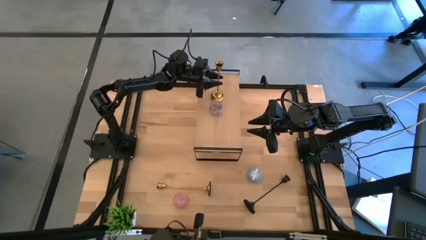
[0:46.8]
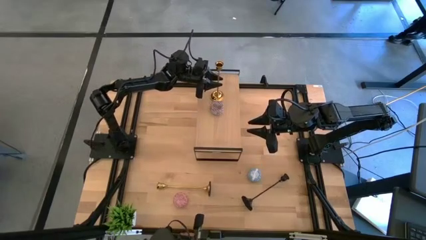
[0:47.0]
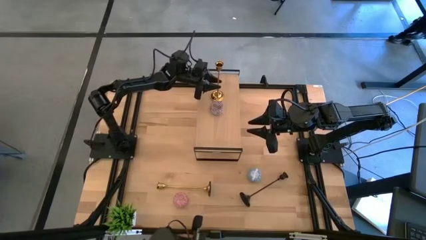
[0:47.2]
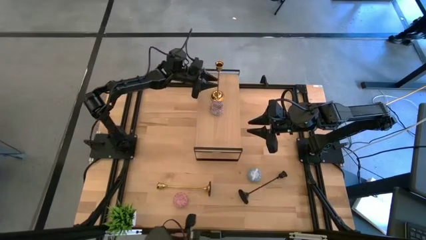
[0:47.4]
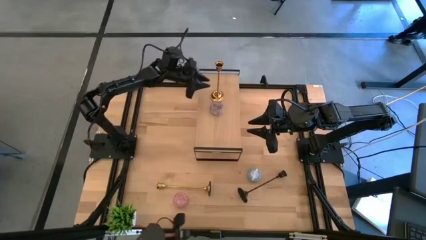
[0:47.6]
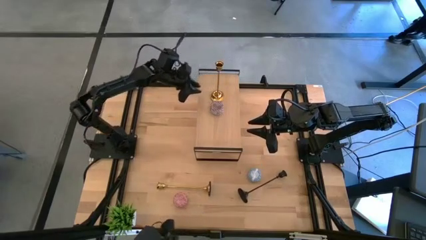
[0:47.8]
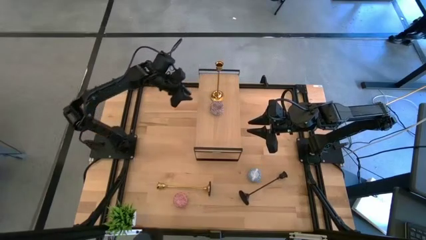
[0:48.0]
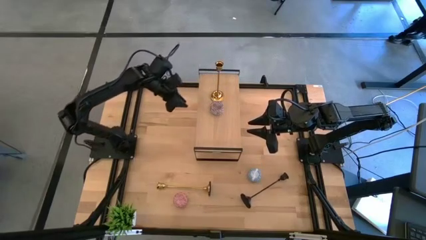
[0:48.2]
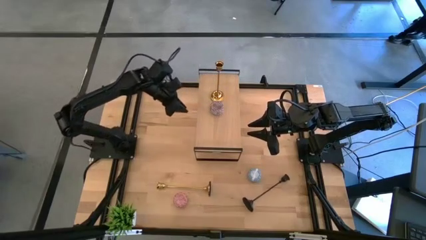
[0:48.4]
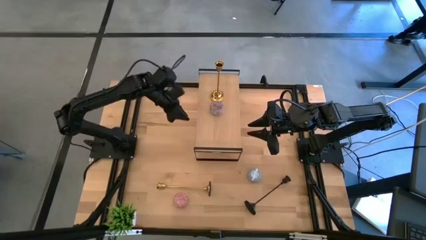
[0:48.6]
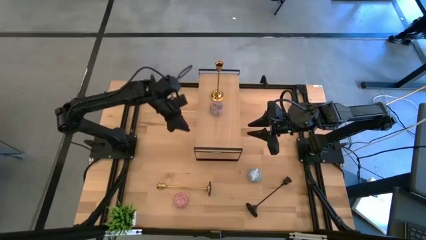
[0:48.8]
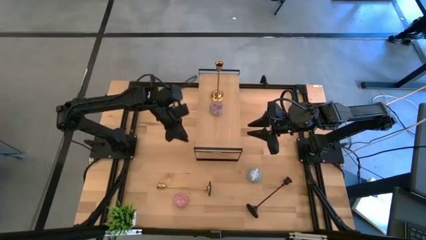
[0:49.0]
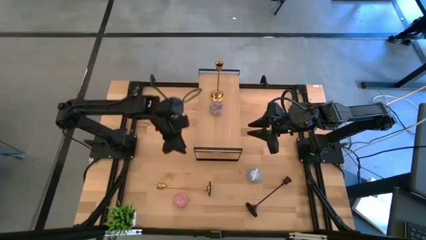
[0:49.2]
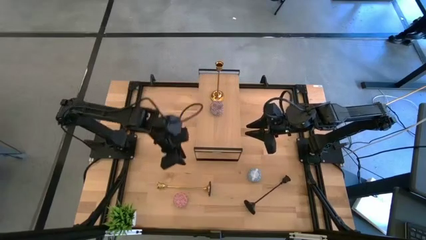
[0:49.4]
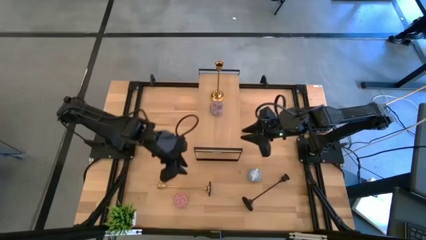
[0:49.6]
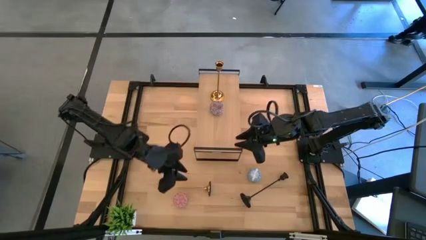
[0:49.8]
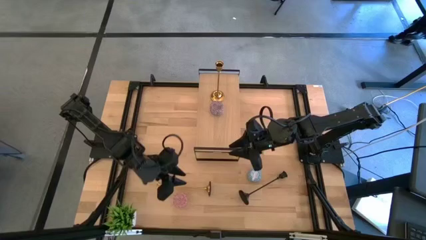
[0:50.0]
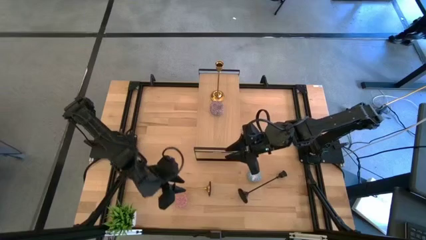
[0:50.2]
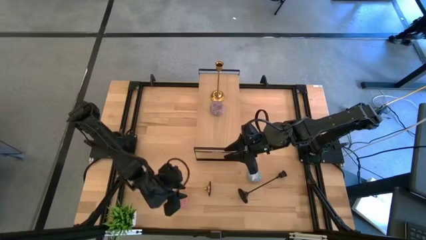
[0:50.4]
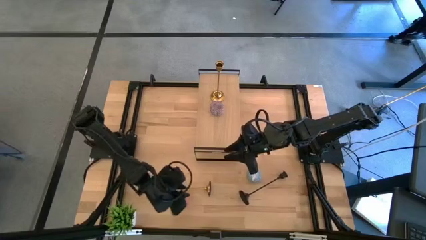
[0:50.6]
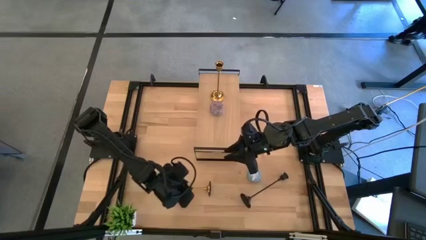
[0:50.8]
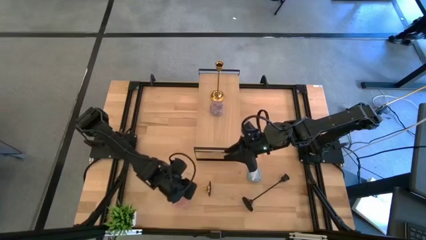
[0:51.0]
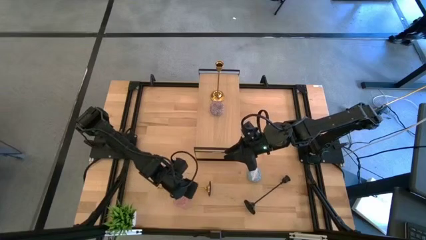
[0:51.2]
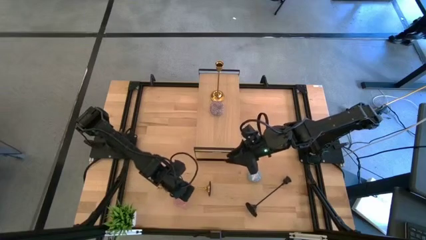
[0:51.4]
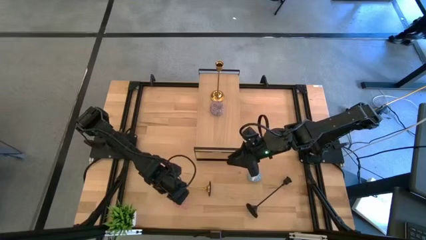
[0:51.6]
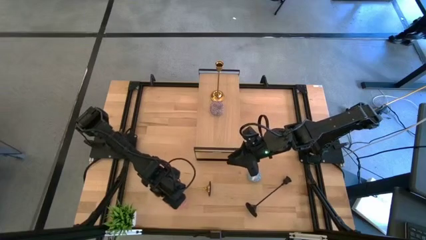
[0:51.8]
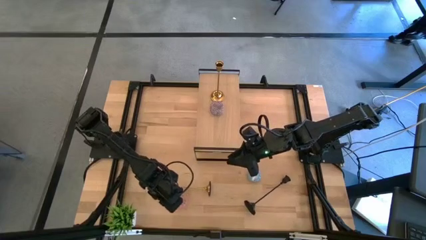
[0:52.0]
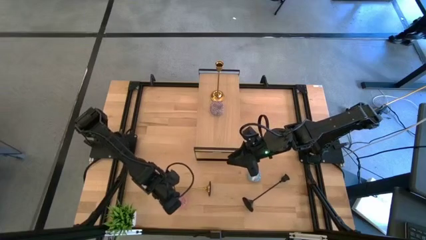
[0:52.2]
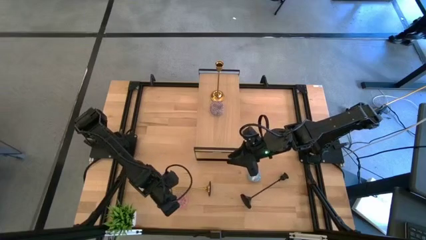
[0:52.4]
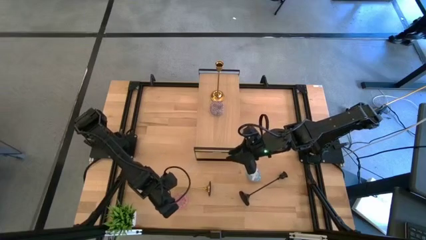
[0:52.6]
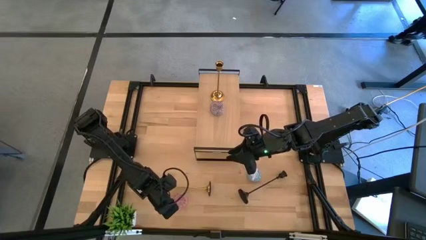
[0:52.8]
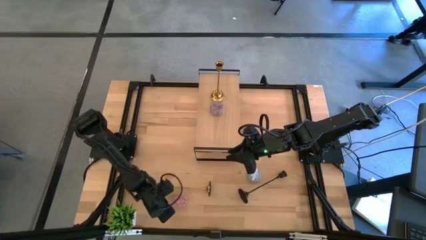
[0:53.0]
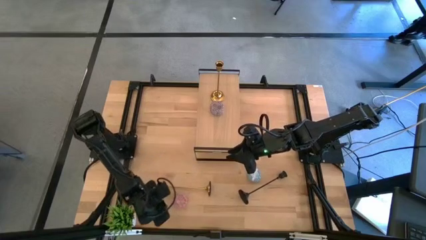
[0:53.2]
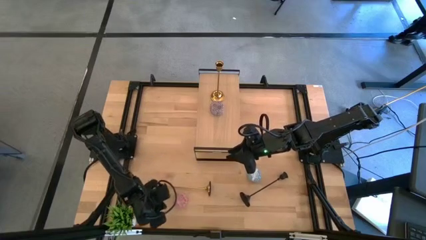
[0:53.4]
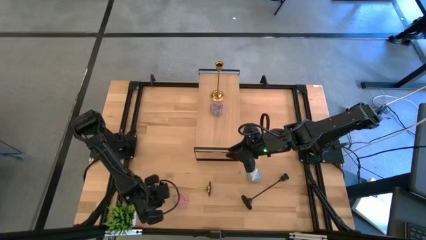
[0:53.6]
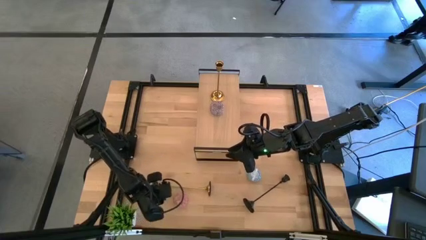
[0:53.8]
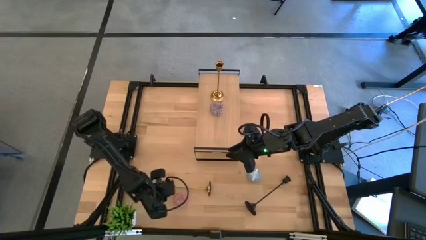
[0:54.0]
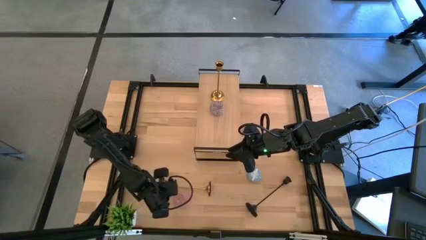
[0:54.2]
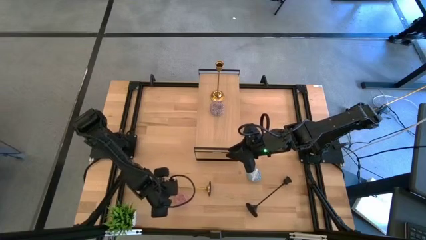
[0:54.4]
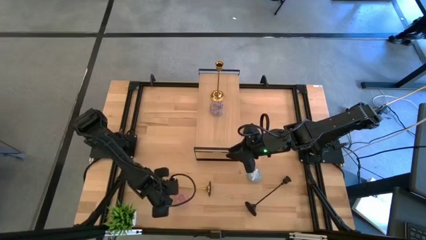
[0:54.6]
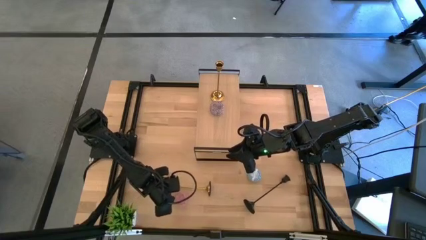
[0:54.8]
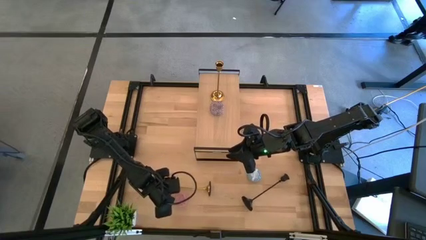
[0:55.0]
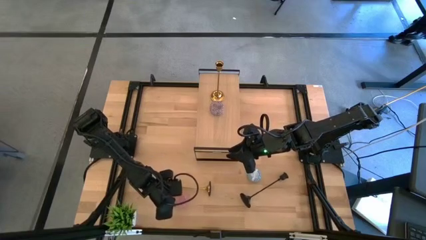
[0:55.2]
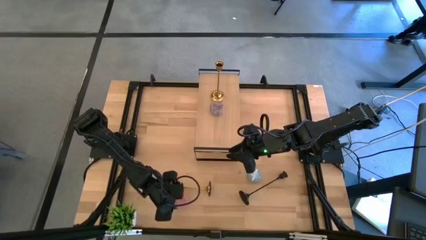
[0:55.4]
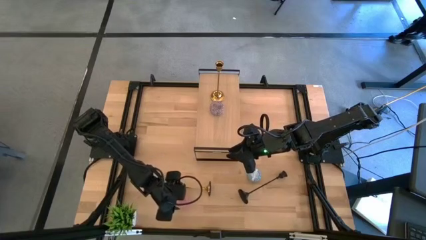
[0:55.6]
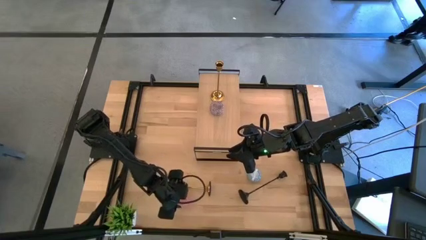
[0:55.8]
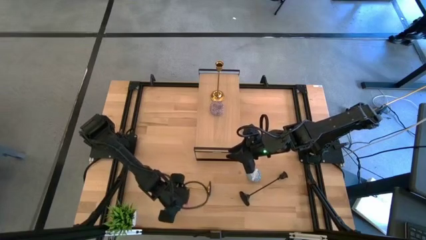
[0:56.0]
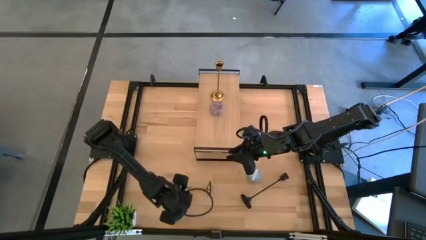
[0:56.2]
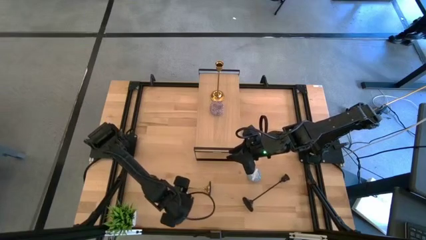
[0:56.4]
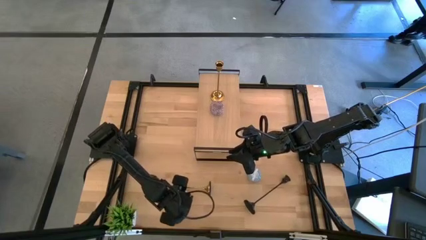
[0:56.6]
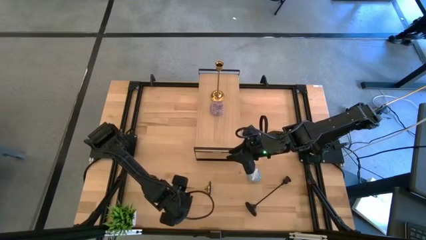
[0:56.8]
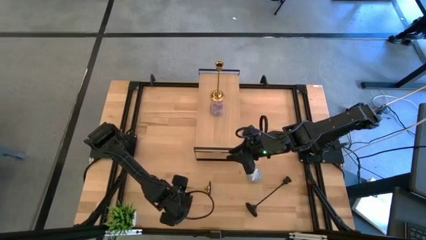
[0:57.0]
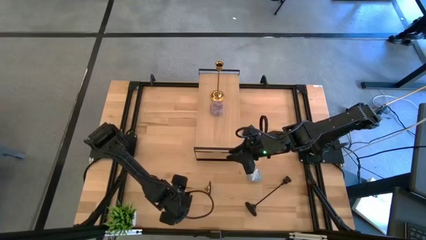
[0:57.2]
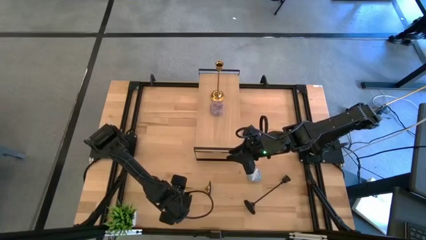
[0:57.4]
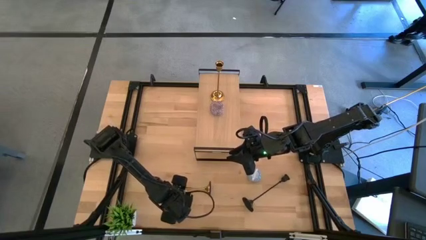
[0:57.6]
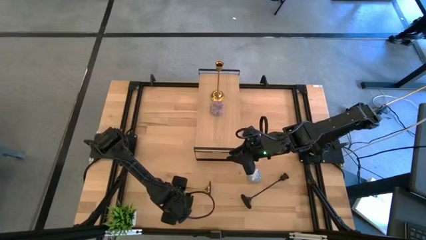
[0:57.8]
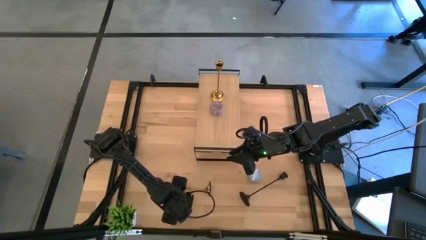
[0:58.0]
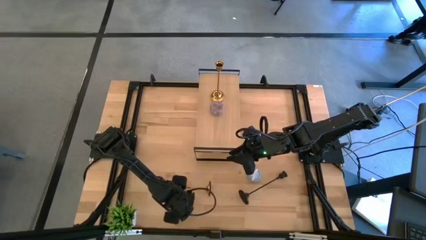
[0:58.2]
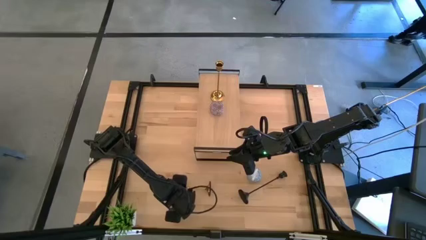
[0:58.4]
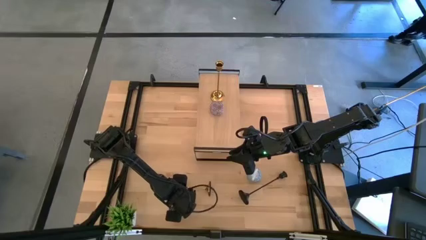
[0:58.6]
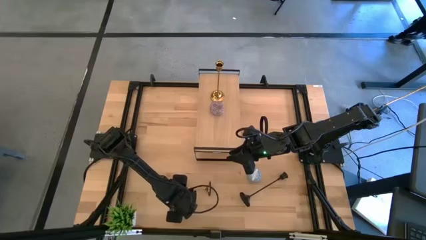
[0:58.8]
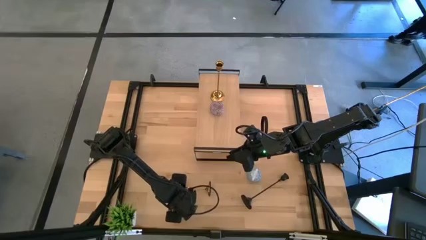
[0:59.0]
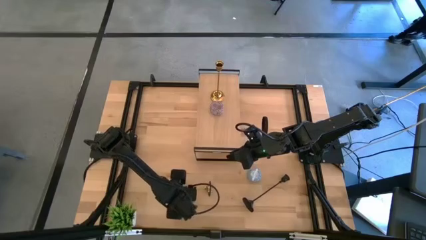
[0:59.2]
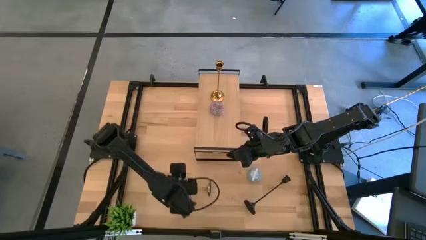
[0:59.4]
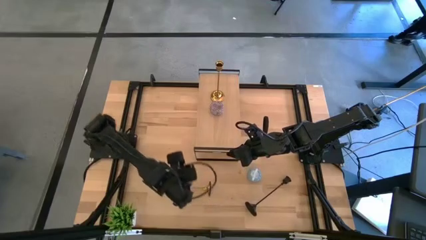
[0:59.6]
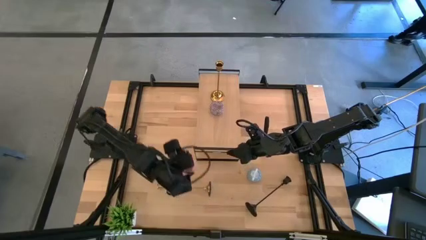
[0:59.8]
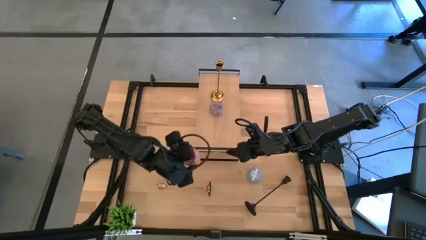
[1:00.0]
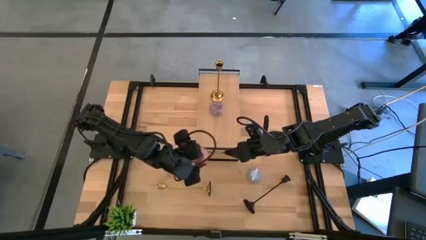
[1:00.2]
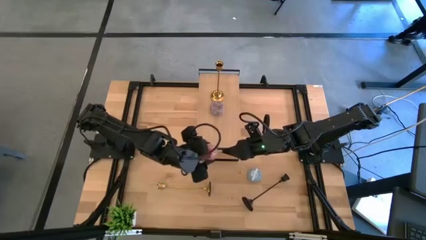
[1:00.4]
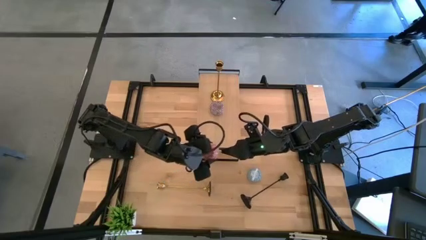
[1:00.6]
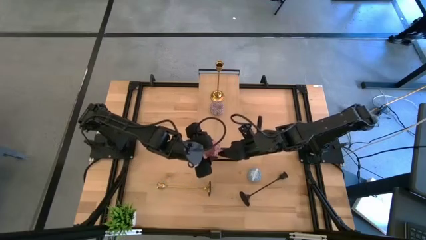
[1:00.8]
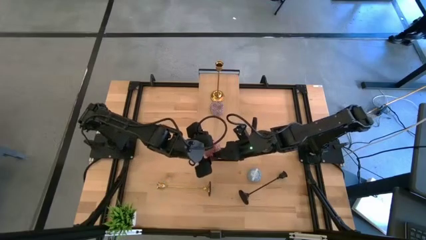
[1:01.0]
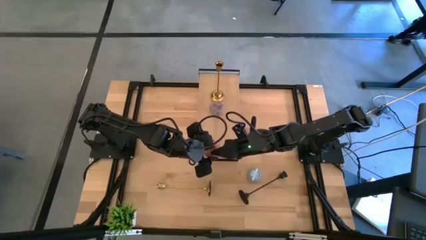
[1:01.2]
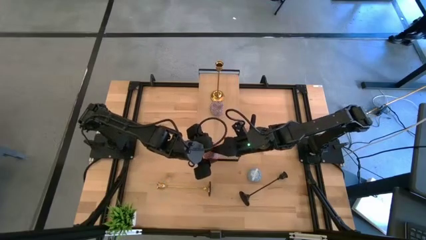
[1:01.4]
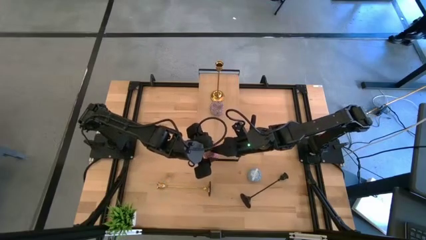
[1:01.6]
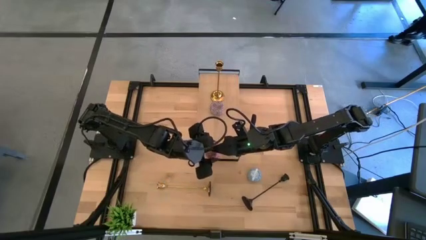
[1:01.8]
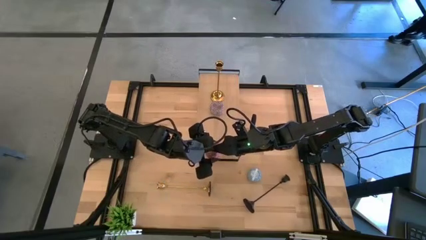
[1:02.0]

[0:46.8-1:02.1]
Task: Pick & Place candle stick holders
Put the pink scented candle on the shelf
